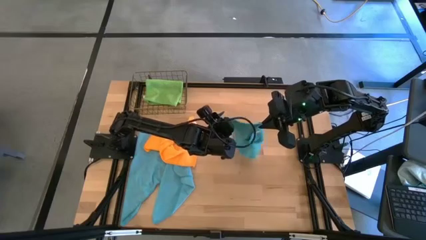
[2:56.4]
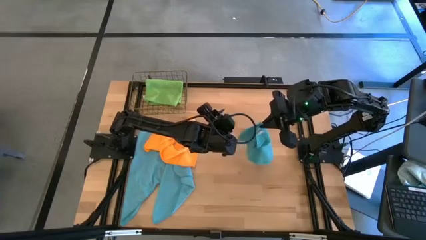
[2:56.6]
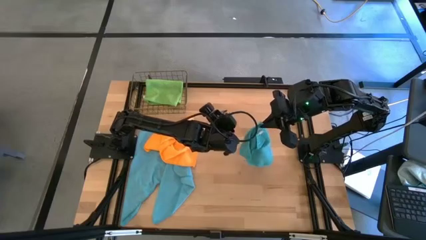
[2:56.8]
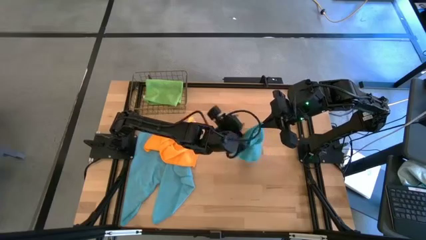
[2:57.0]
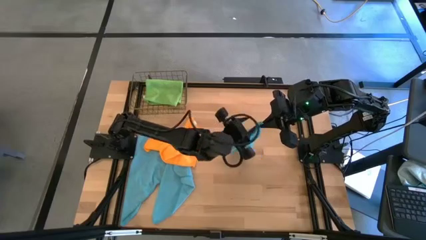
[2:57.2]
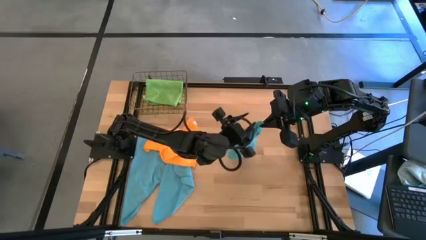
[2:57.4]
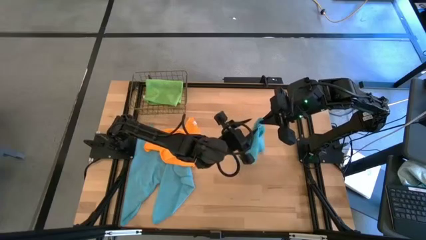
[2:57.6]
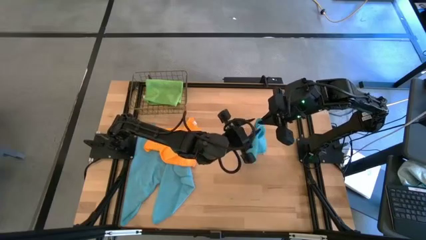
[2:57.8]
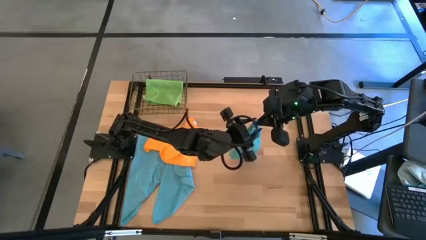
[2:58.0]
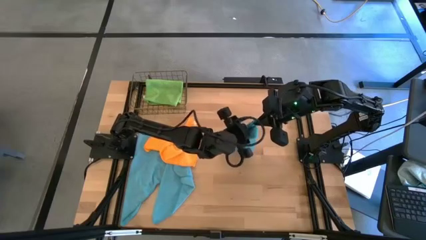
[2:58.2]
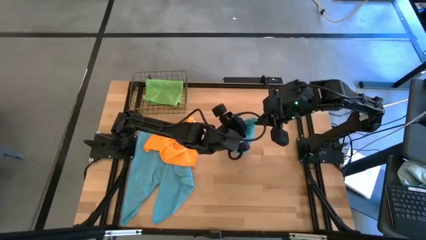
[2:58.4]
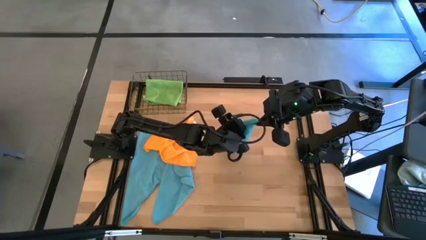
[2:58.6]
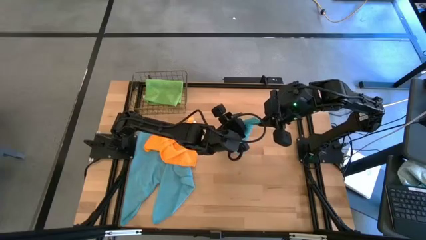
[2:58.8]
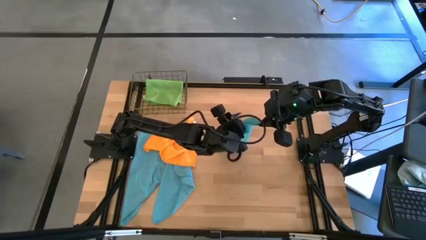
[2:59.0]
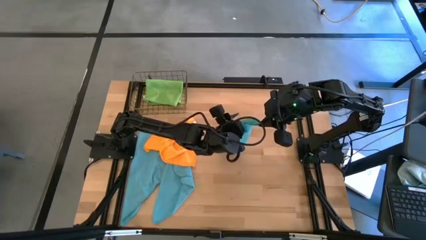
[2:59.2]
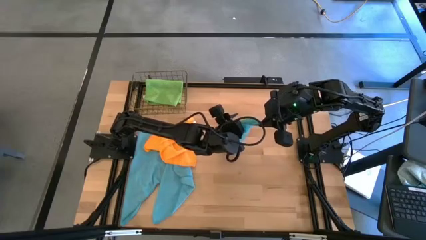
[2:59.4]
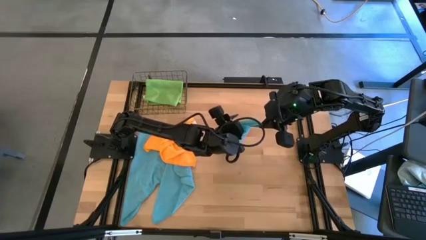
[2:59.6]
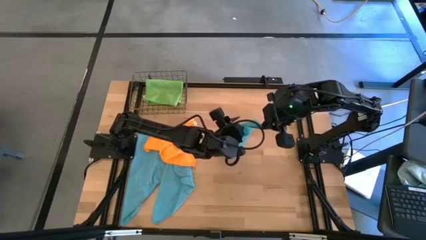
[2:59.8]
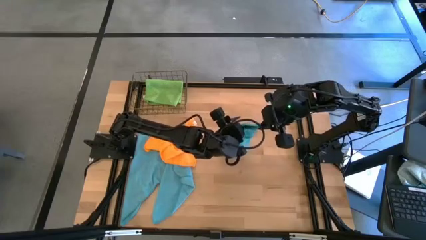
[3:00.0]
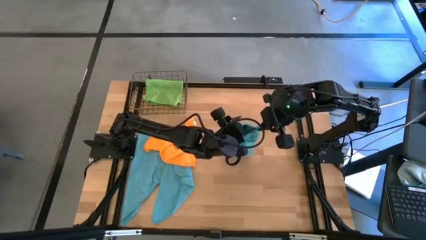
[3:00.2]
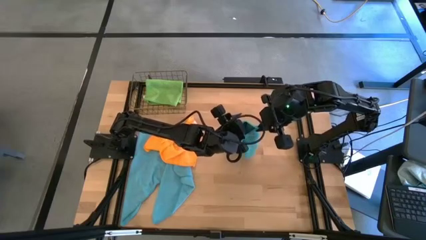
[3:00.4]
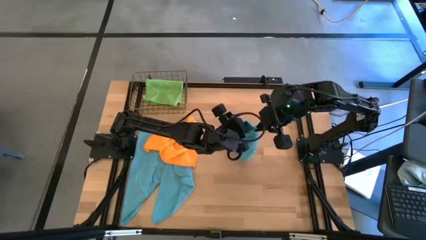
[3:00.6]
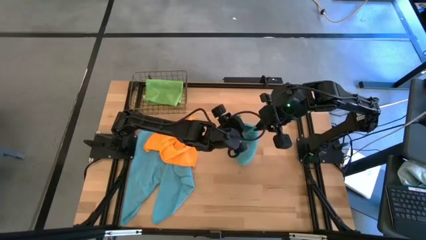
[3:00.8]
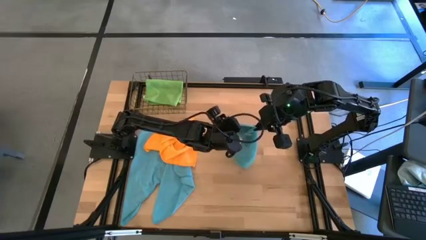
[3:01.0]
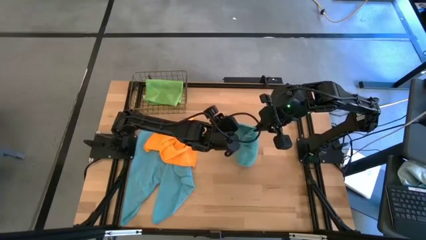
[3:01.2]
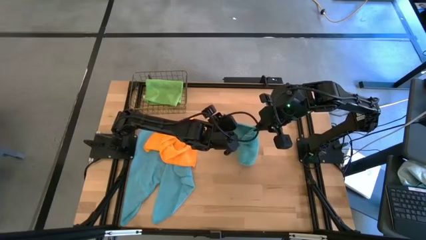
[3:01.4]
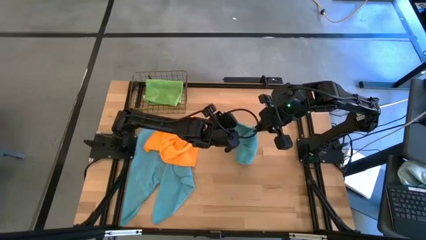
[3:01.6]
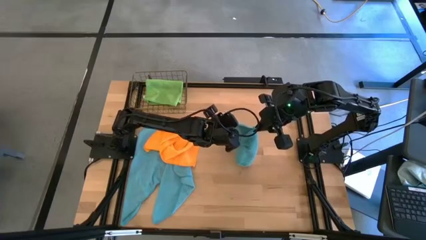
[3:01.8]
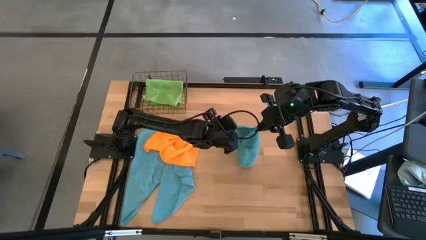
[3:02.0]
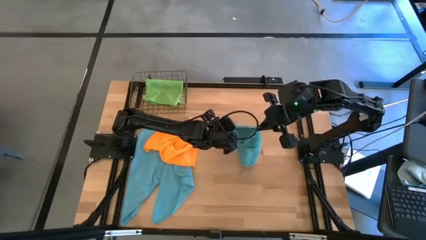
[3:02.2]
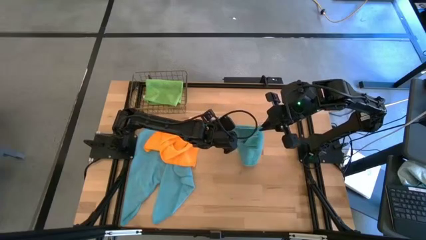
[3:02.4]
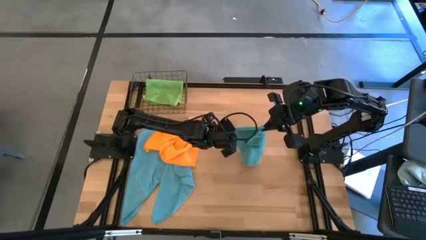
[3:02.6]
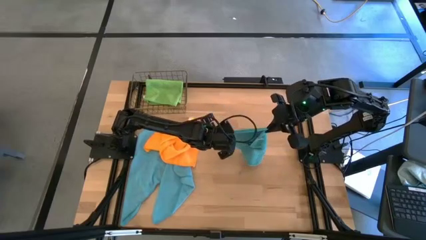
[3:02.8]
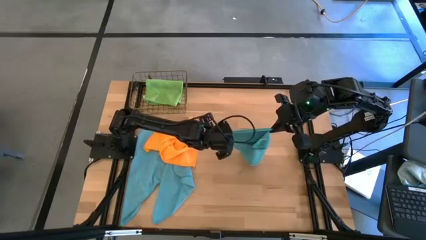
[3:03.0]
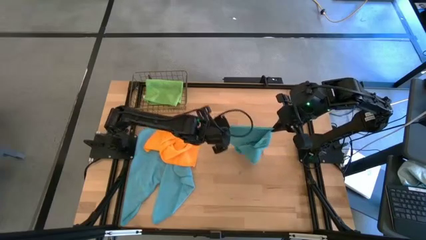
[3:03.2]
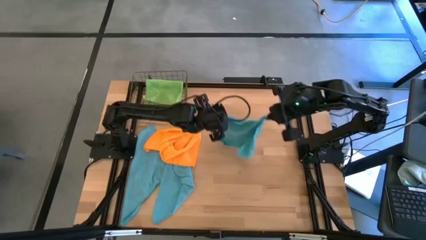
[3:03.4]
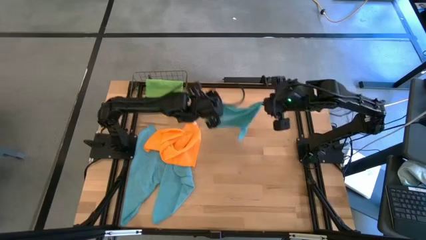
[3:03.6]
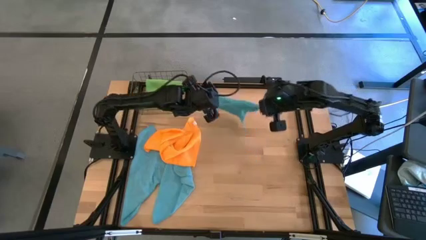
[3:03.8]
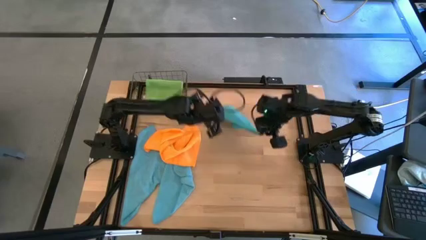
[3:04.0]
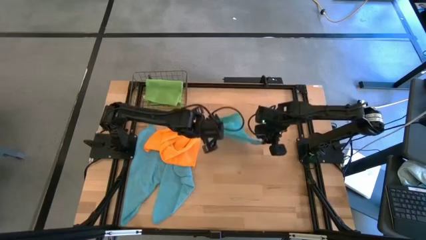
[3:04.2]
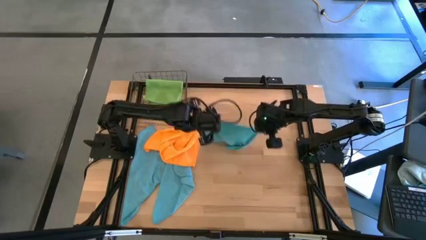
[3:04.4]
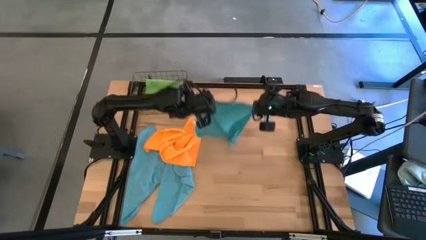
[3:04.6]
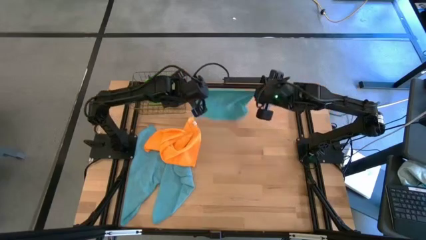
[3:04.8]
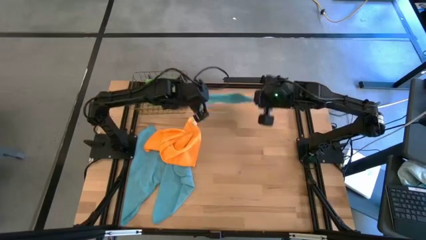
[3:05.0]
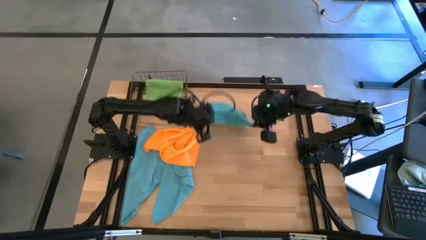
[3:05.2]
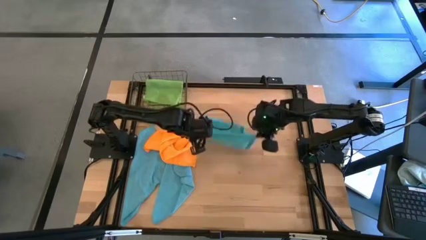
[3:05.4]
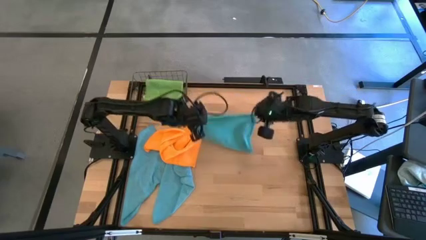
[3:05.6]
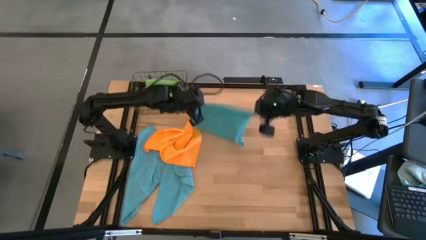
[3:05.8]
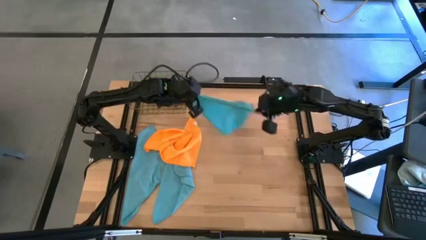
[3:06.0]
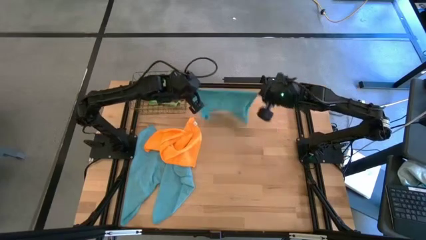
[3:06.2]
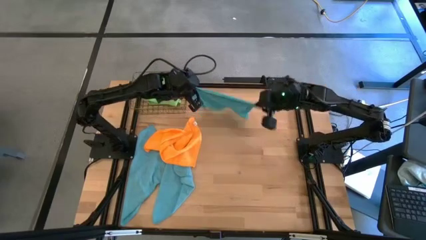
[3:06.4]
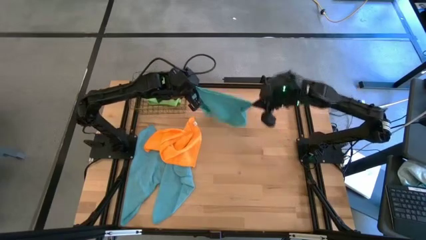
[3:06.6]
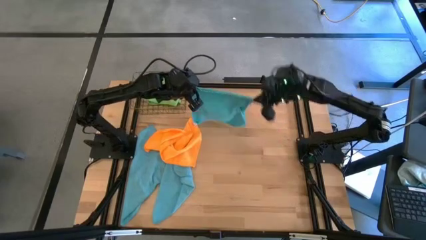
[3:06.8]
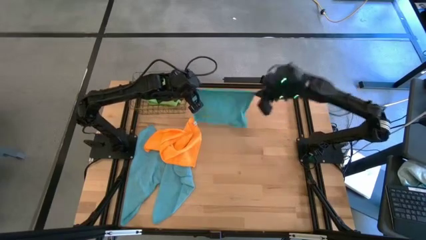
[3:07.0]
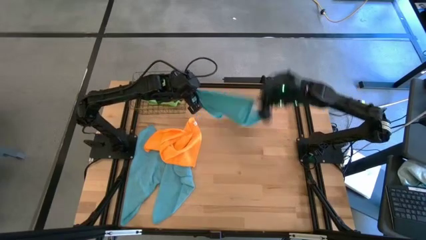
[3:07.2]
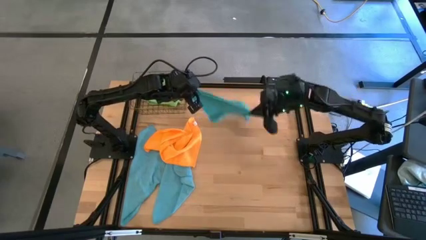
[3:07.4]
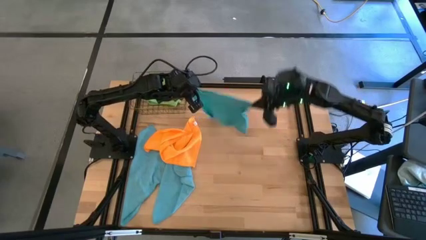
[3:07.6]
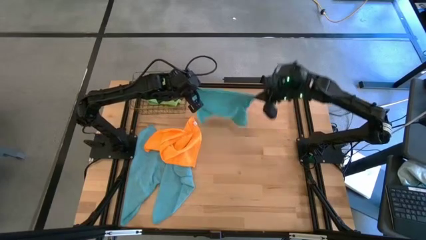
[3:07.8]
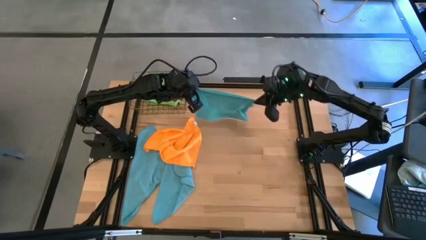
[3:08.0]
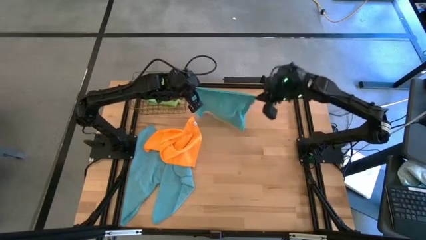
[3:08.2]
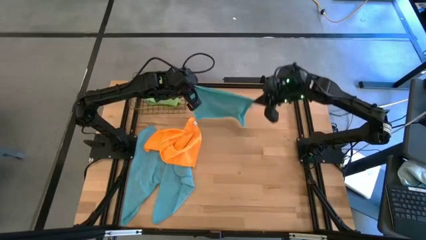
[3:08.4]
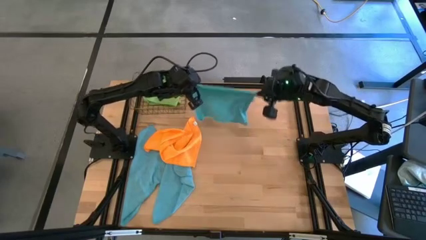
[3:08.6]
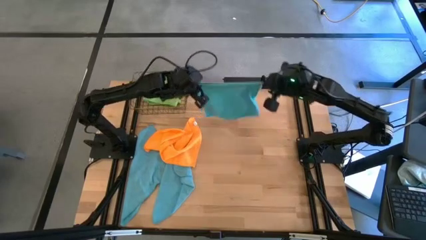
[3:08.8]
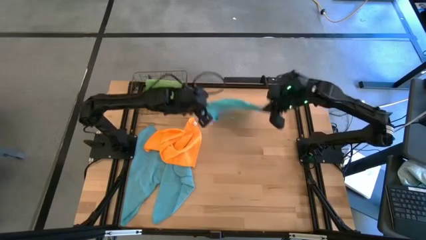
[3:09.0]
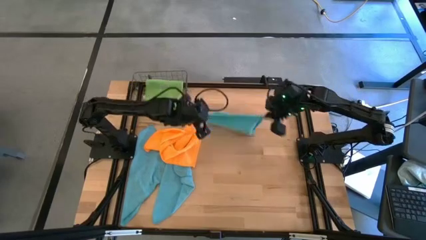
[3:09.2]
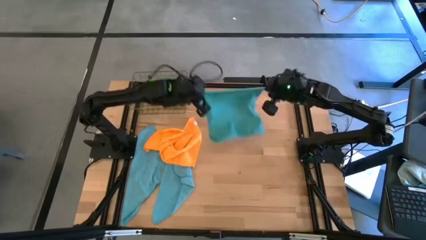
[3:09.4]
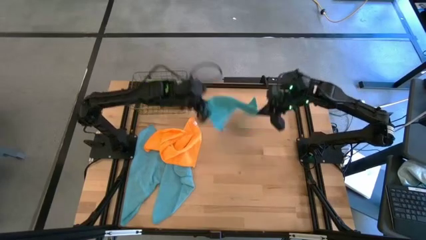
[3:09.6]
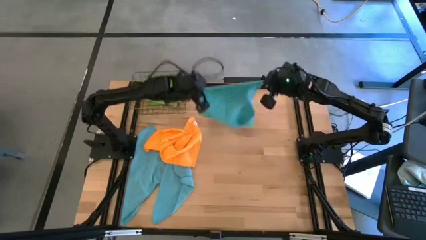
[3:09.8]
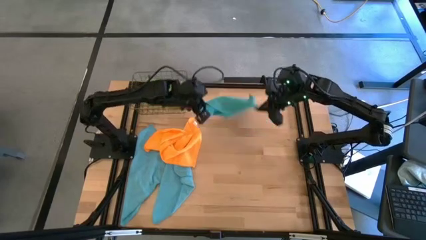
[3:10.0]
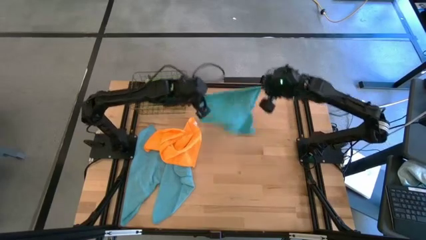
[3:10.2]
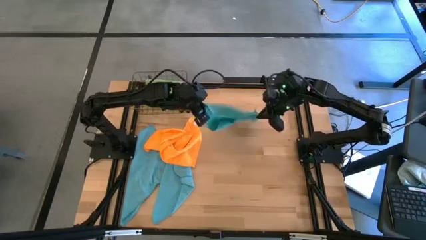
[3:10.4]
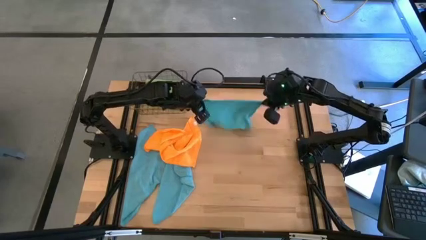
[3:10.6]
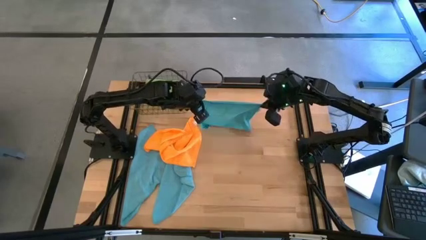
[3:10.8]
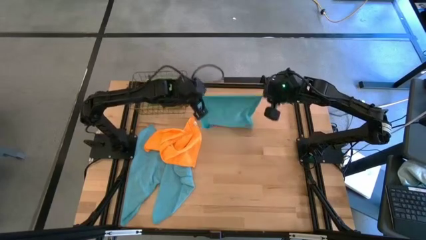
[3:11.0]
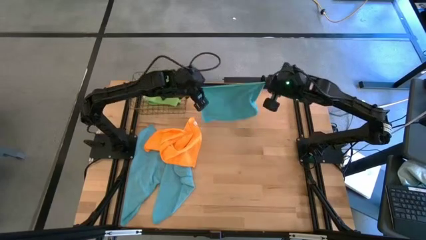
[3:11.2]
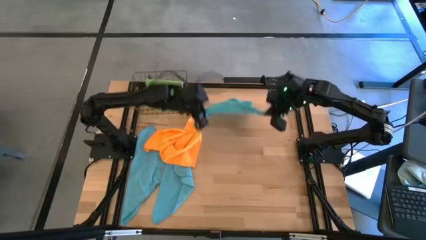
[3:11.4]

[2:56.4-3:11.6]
Task: Fold microfiber towels
Fold the blue microfiber cloth
